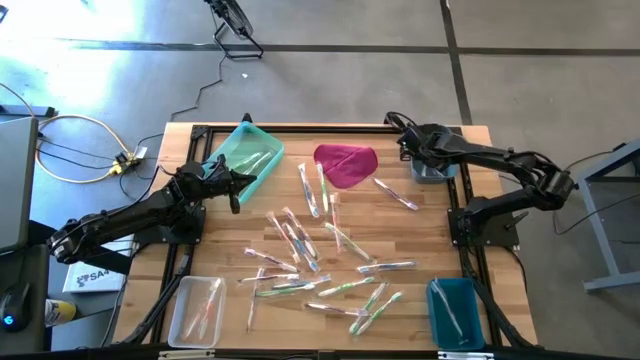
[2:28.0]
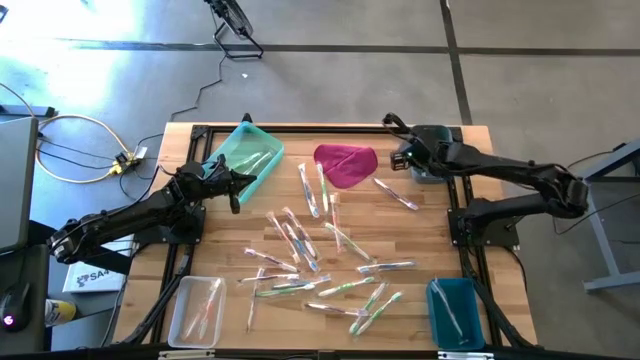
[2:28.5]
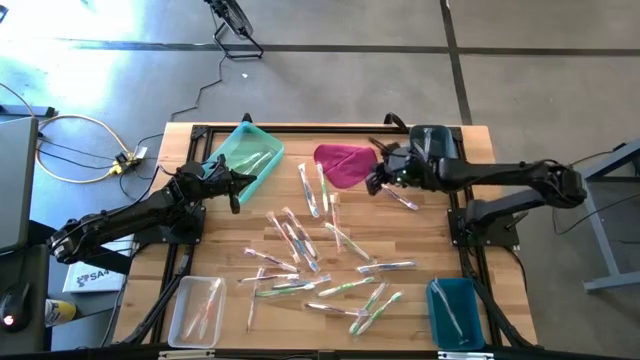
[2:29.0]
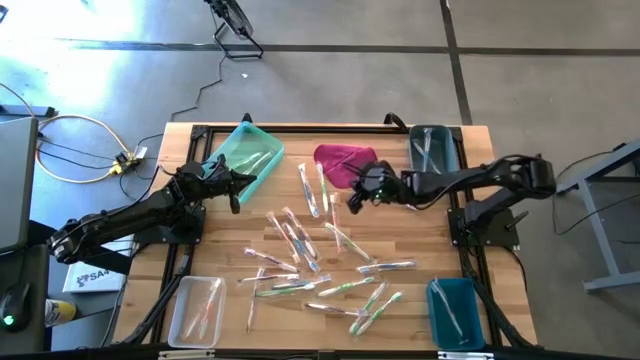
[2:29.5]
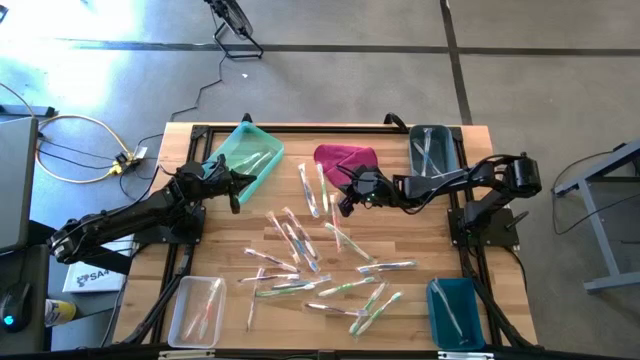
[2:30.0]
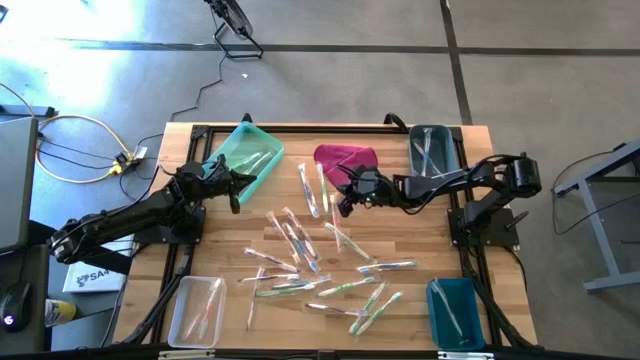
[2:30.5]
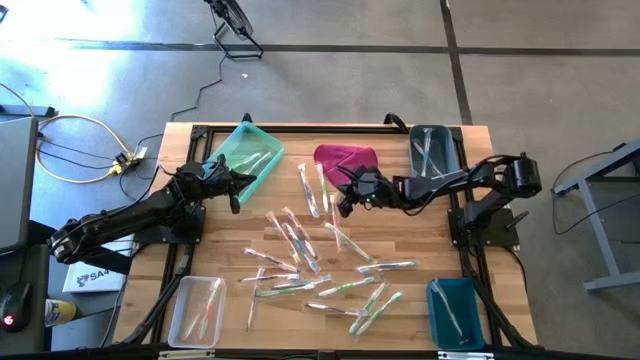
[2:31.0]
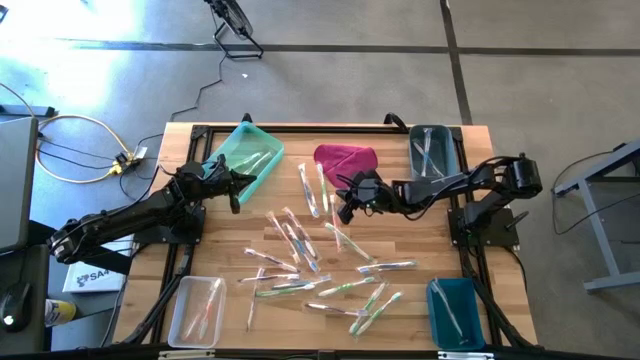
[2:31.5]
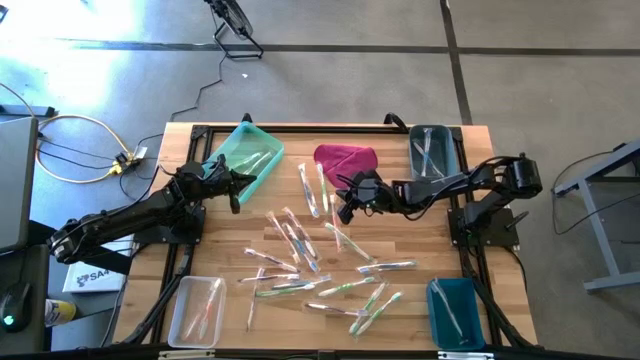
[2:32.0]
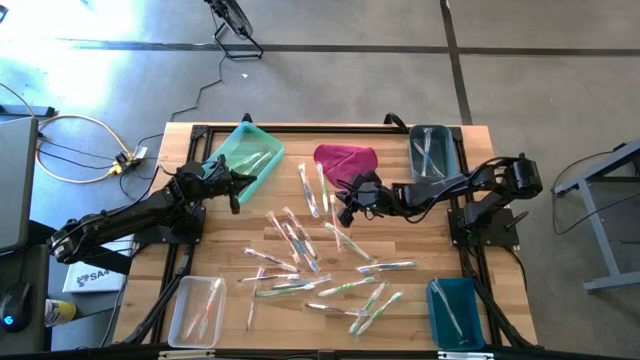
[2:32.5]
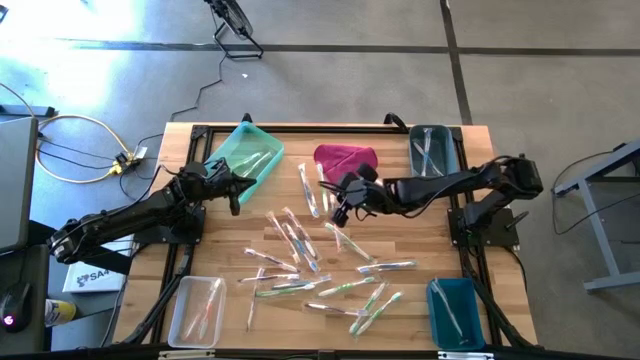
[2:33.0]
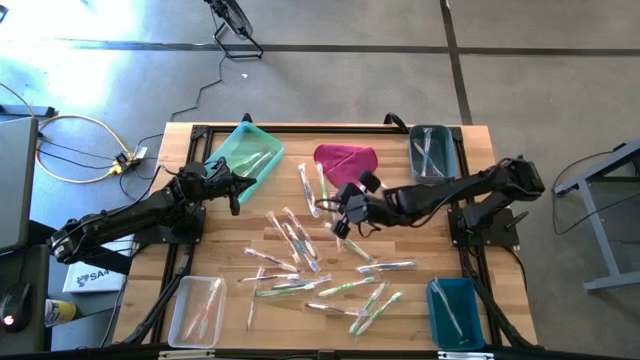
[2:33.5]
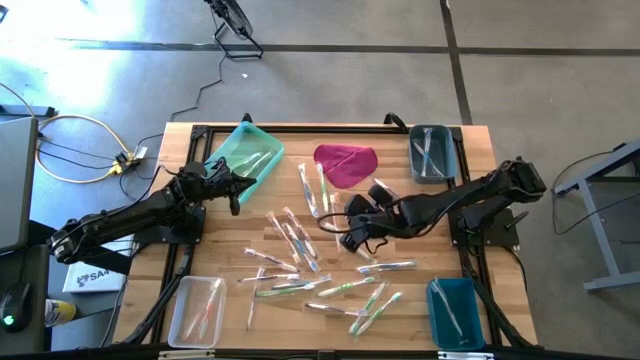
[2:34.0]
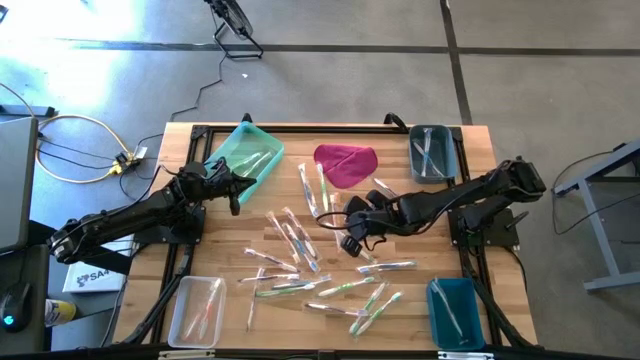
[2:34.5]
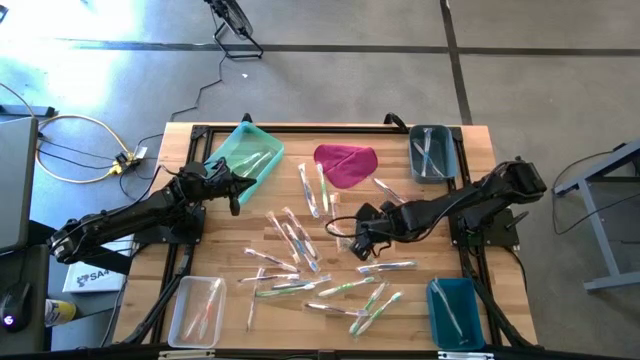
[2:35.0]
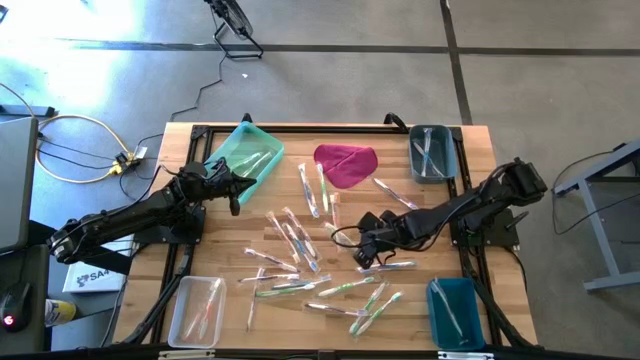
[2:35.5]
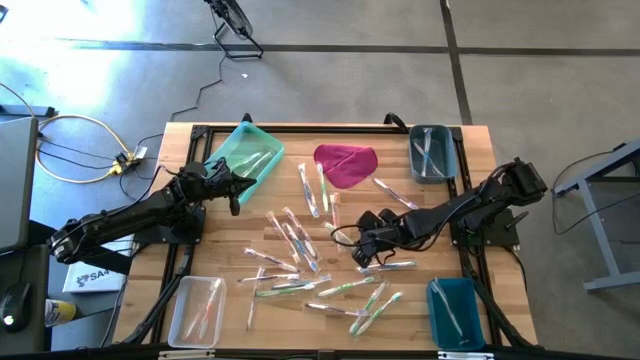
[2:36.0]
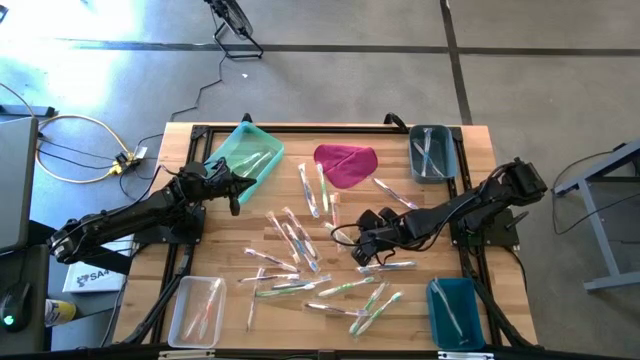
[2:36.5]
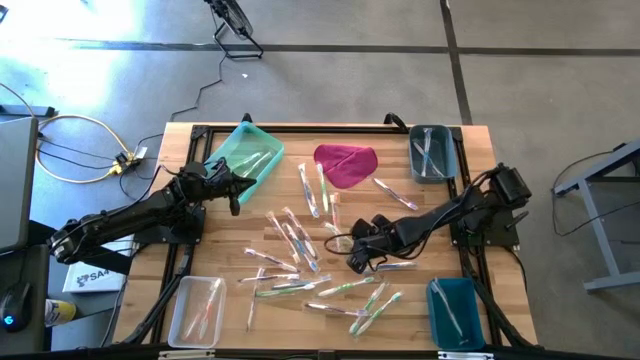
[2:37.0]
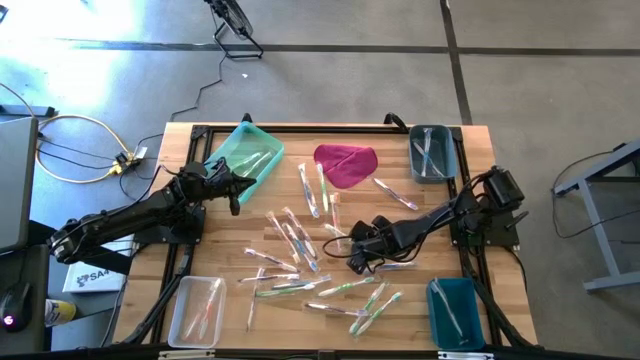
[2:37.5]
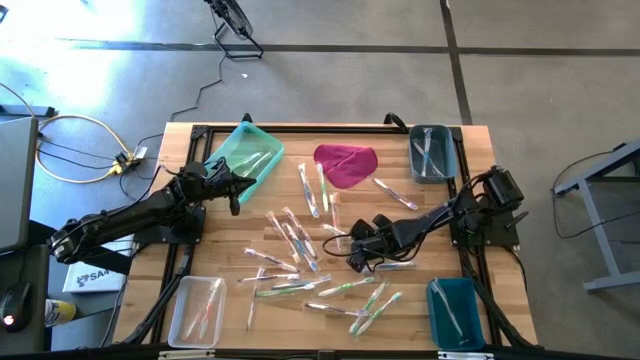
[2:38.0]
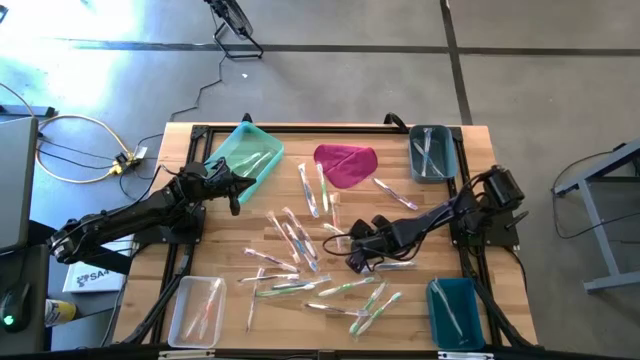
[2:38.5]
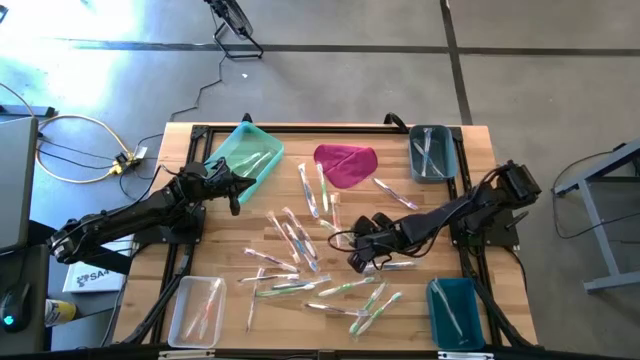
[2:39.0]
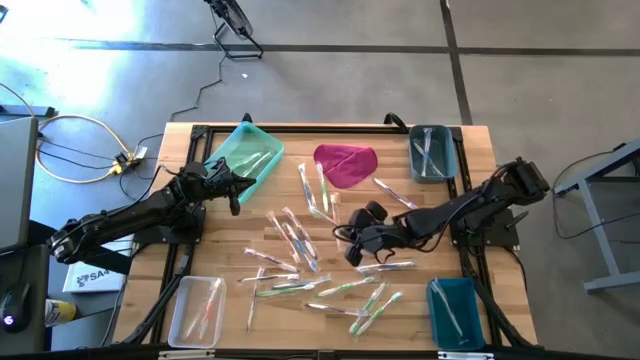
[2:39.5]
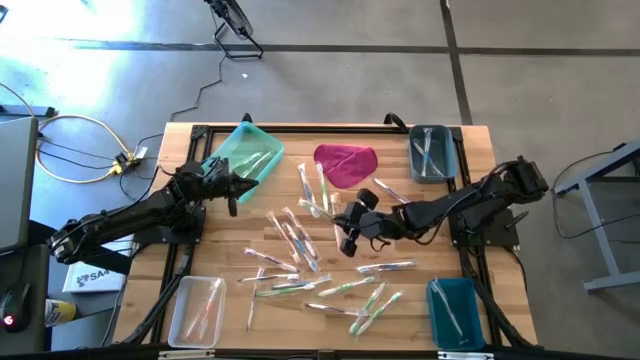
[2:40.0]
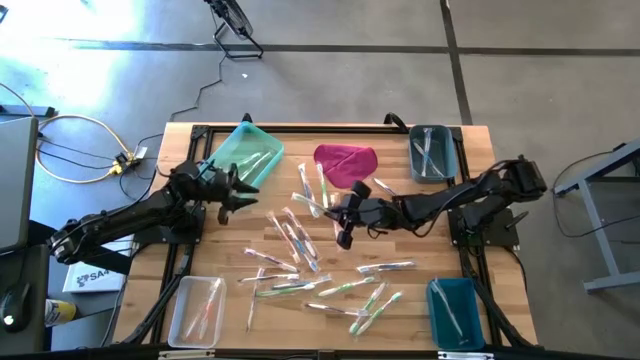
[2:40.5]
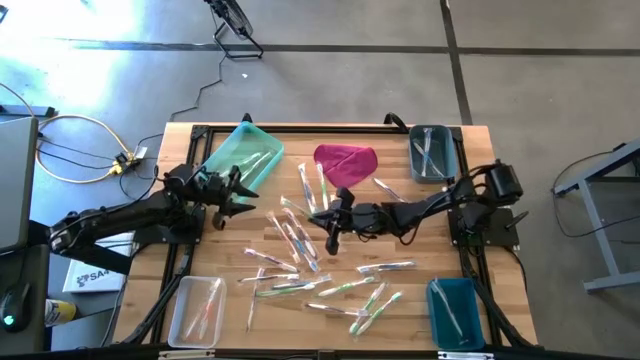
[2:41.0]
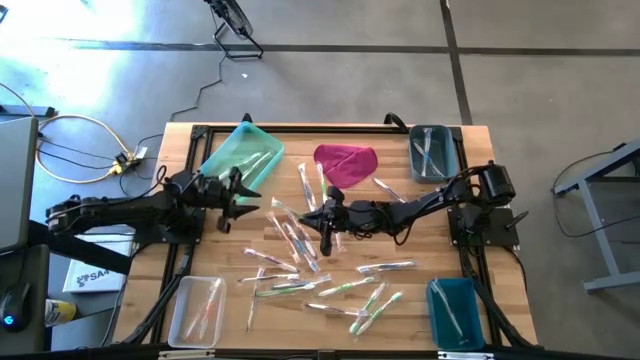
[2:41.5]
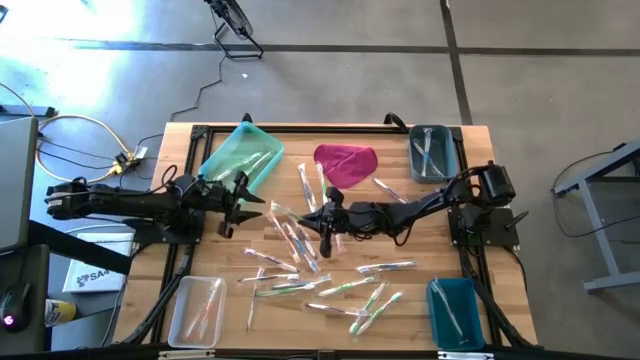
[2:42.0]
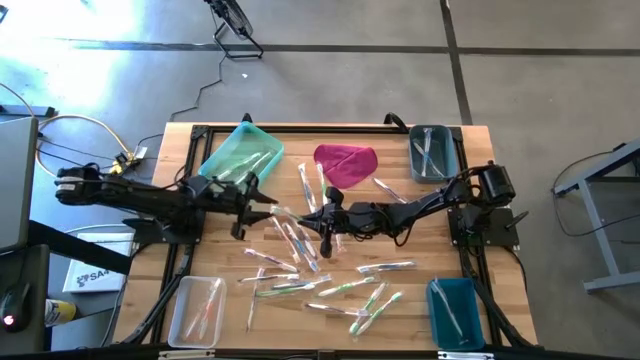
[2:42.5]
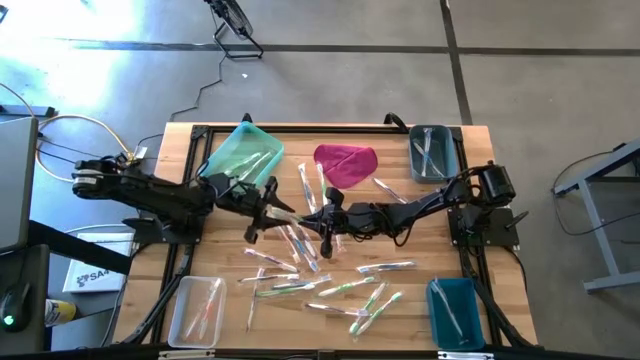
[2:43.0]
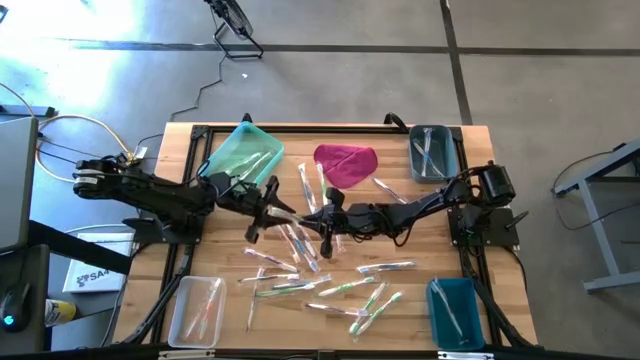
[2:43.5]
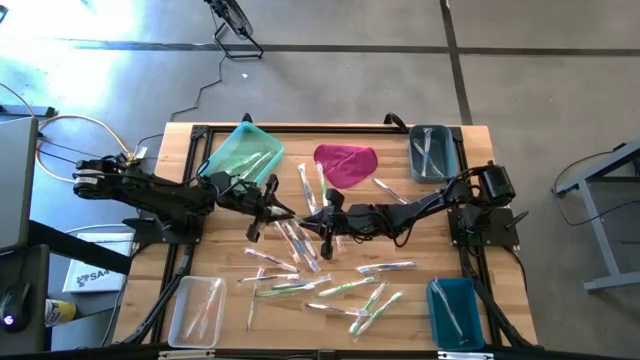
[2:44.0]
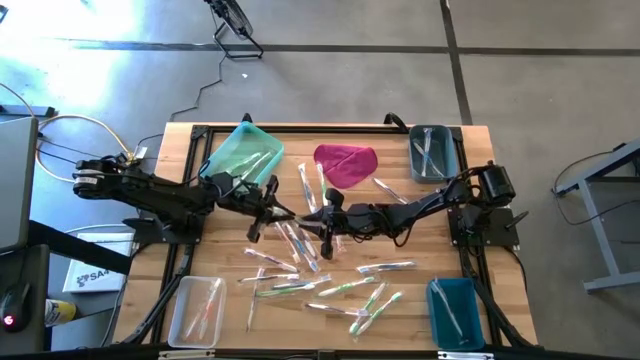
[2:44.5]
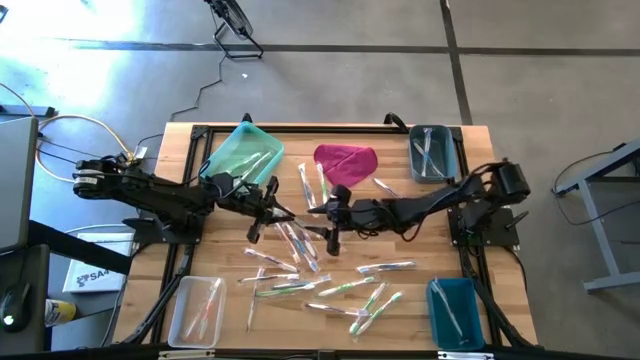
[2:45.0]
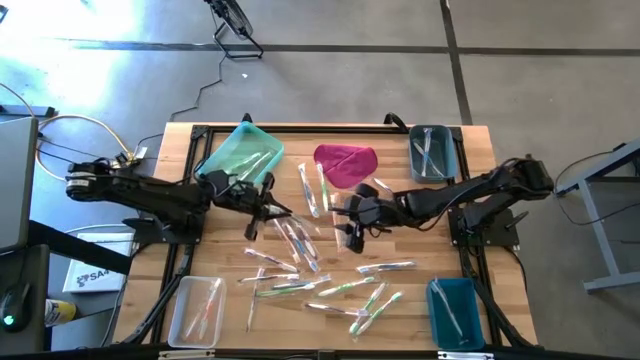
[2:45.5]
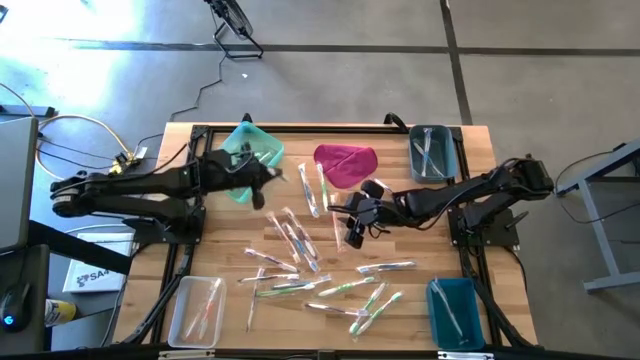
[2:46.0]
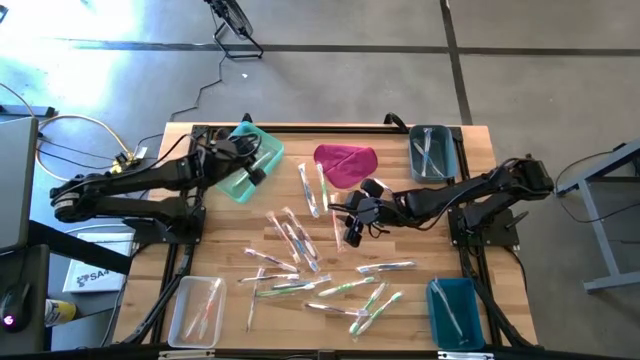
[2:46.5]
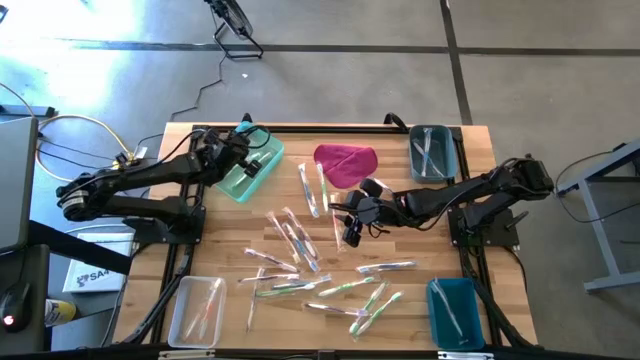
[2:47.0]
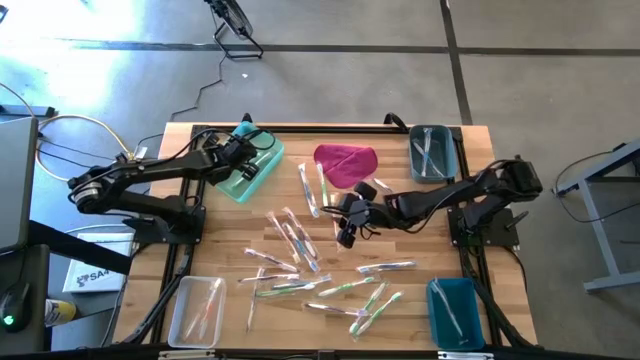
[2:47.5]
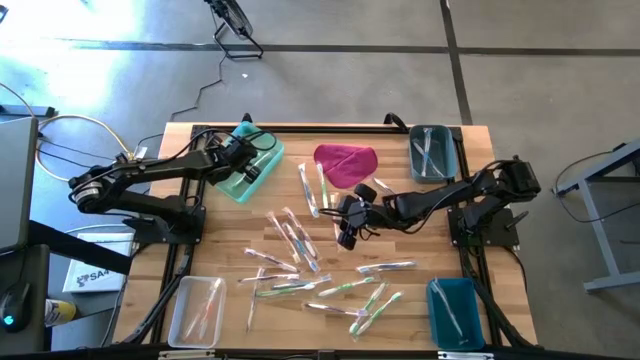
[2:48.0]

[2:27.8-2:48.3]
Task: Pick & Place Toothbrushes
Put the green toothbrush to the green bin

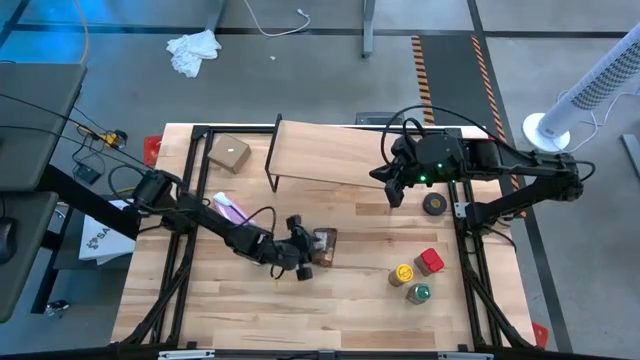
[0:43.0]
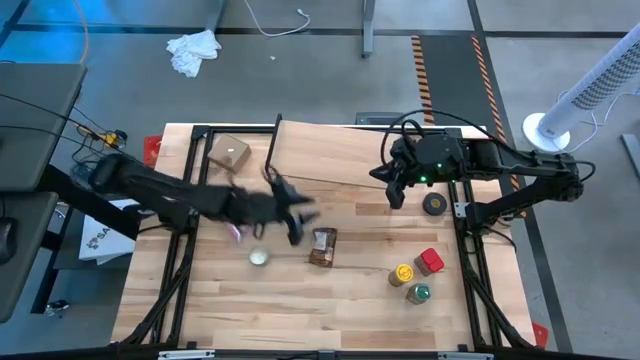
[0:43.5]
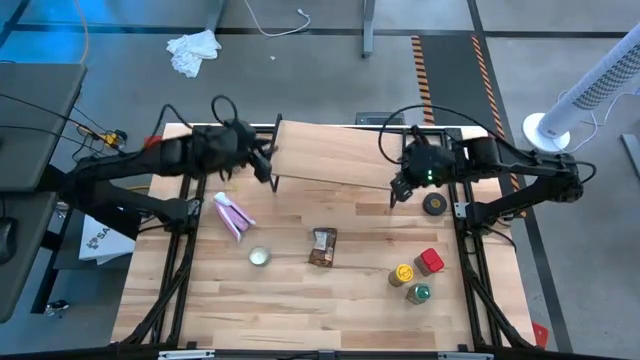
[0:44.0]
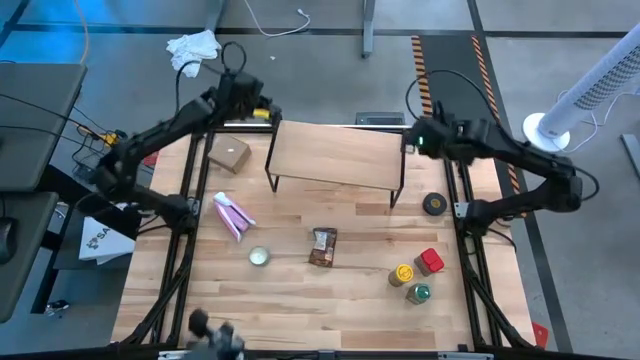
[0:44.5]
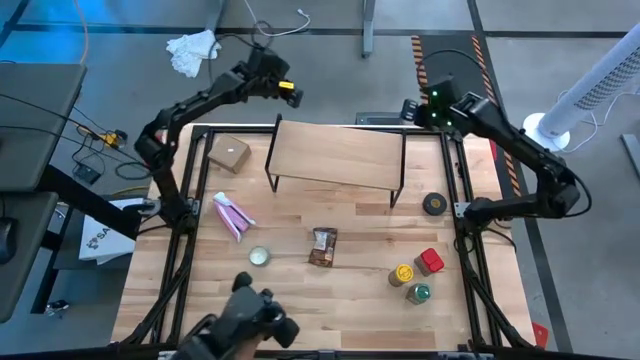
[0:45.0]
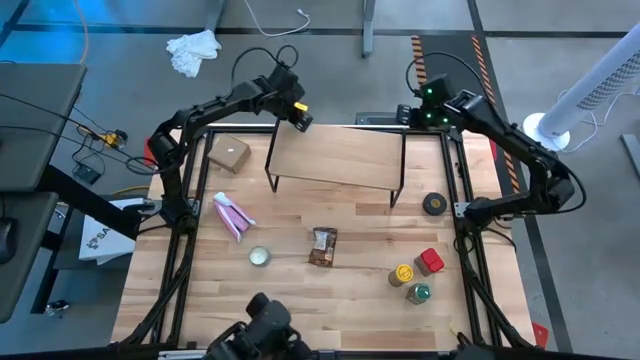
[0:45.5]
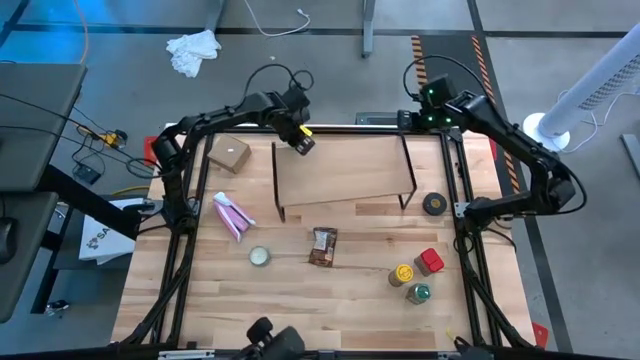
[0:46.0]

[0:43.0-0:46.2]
Task: Shelf spices
Adjust the shelf
